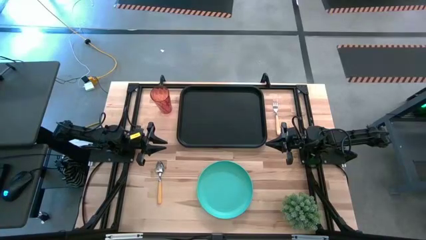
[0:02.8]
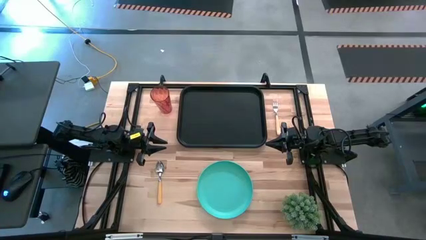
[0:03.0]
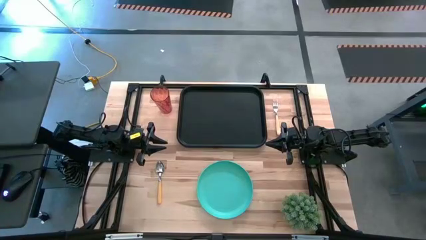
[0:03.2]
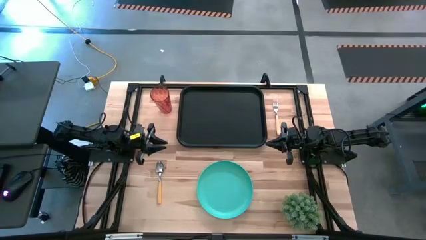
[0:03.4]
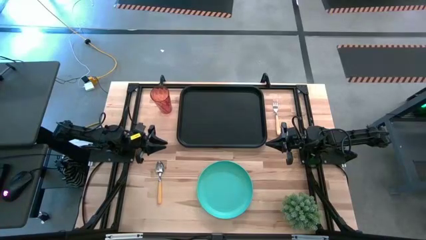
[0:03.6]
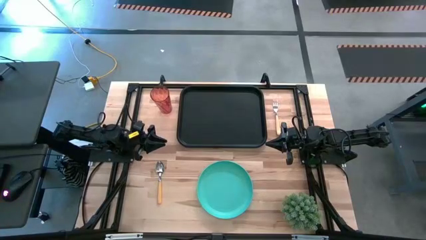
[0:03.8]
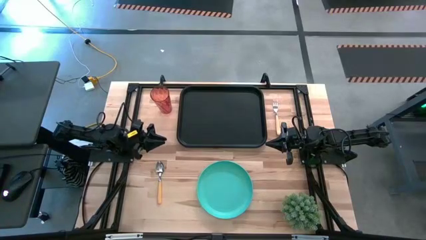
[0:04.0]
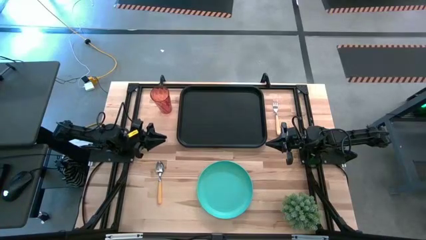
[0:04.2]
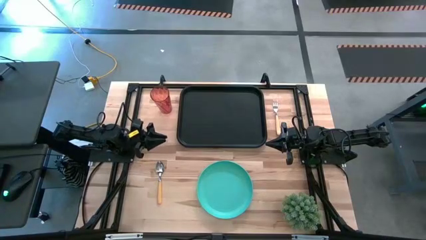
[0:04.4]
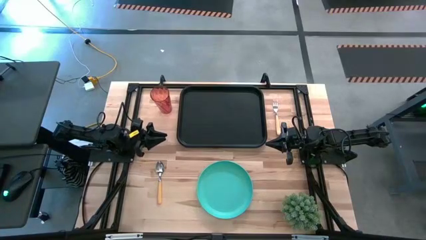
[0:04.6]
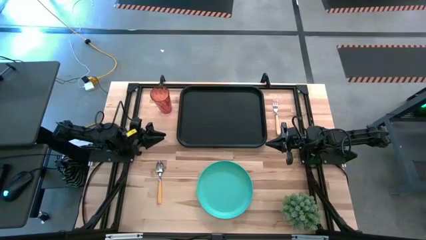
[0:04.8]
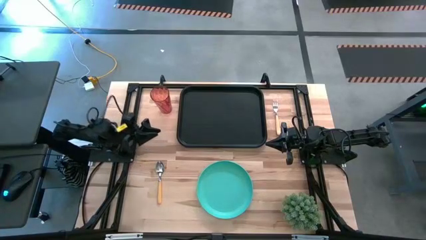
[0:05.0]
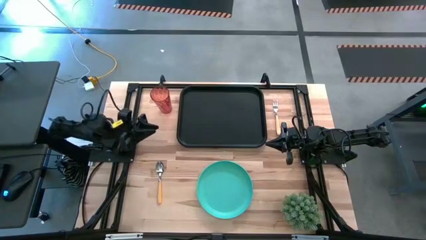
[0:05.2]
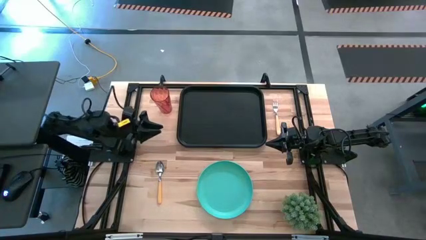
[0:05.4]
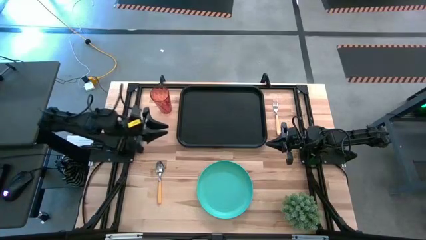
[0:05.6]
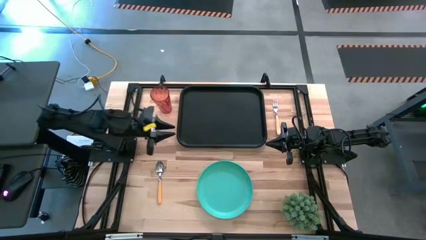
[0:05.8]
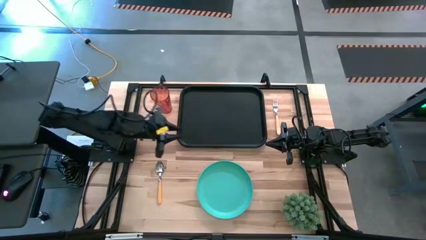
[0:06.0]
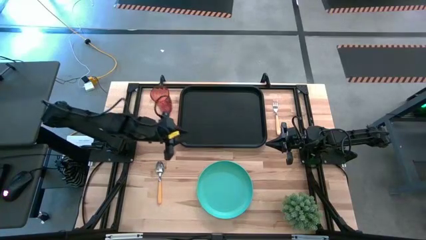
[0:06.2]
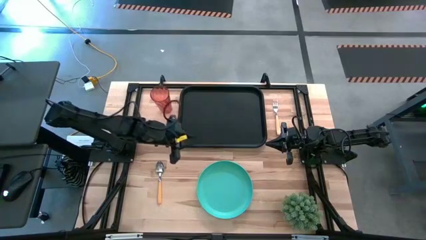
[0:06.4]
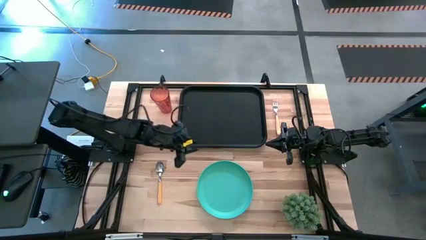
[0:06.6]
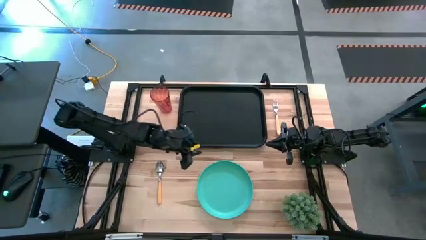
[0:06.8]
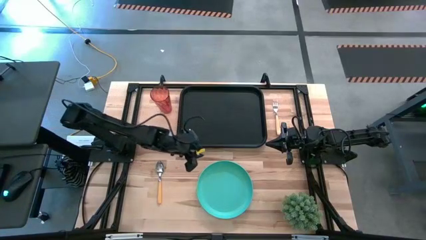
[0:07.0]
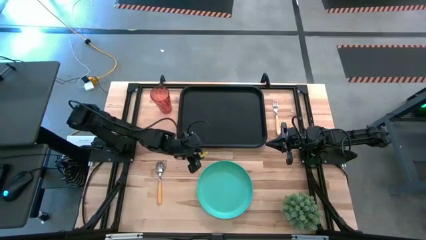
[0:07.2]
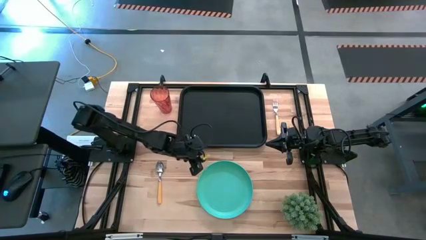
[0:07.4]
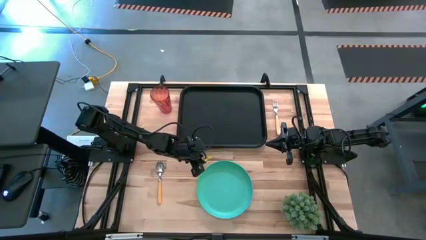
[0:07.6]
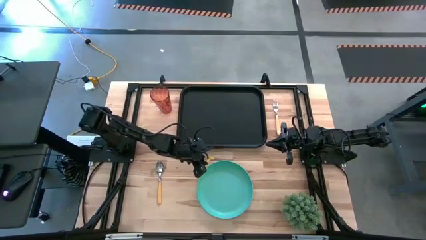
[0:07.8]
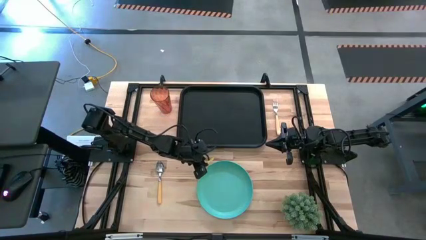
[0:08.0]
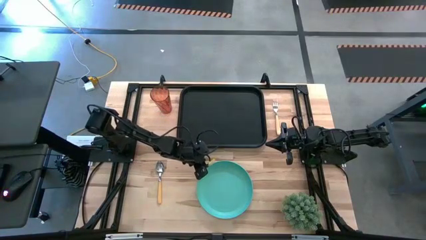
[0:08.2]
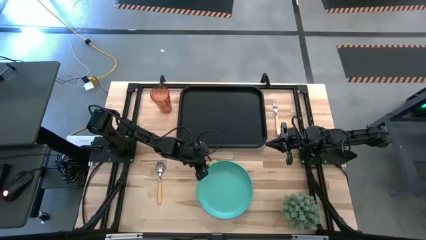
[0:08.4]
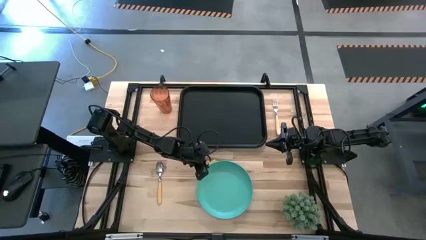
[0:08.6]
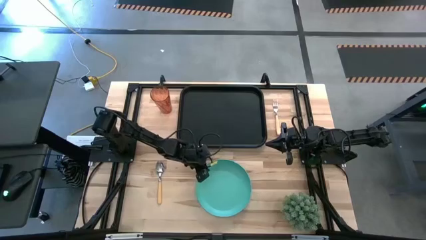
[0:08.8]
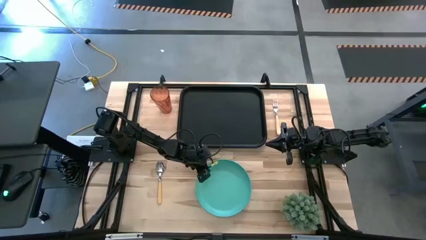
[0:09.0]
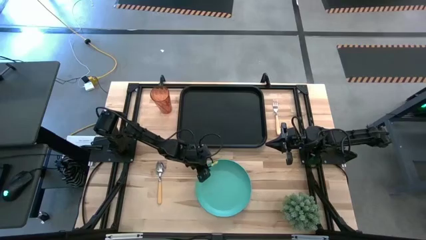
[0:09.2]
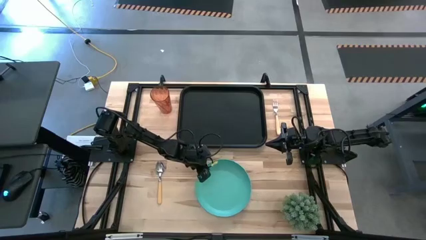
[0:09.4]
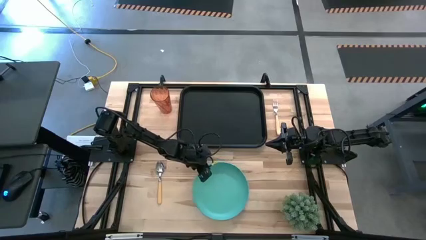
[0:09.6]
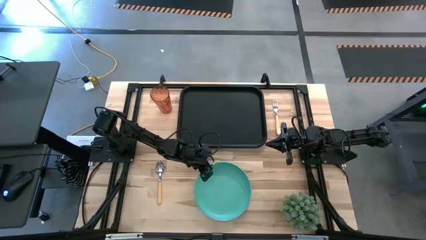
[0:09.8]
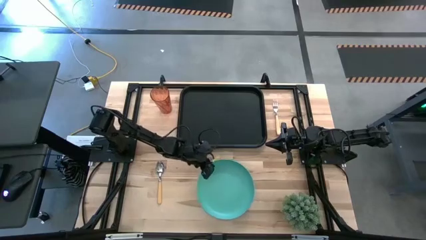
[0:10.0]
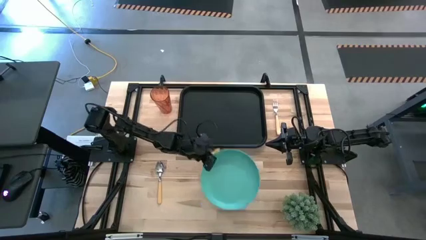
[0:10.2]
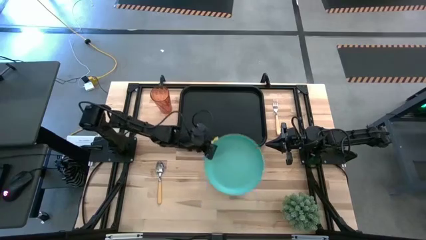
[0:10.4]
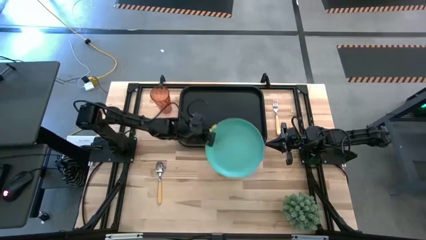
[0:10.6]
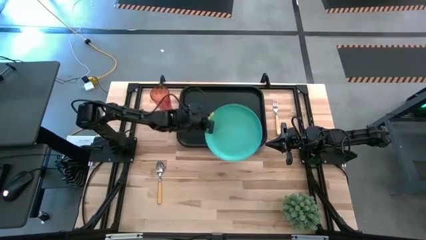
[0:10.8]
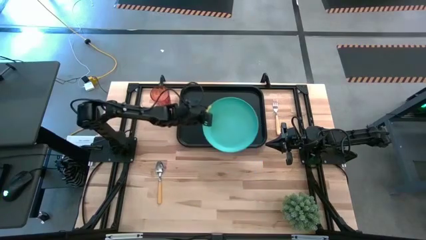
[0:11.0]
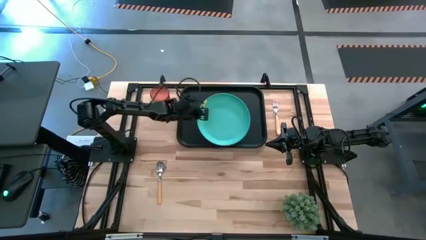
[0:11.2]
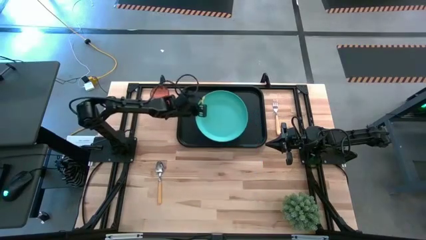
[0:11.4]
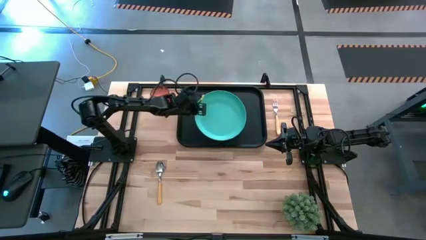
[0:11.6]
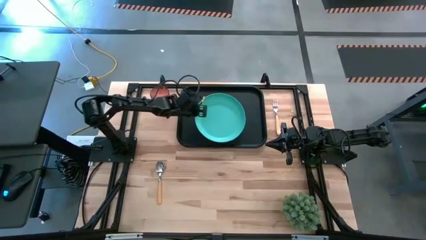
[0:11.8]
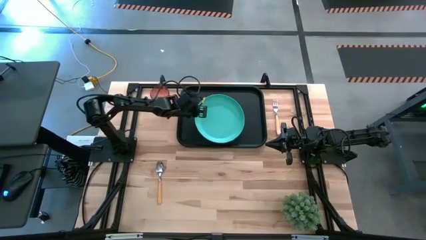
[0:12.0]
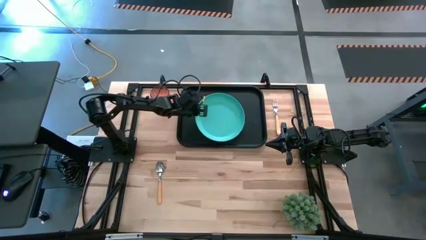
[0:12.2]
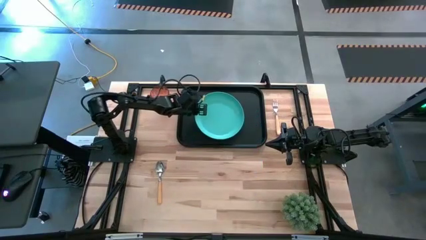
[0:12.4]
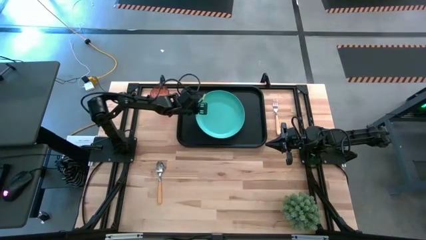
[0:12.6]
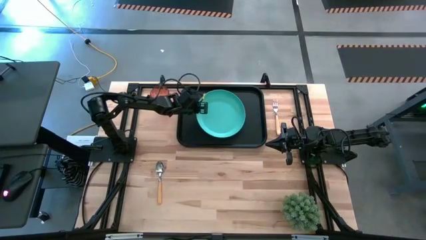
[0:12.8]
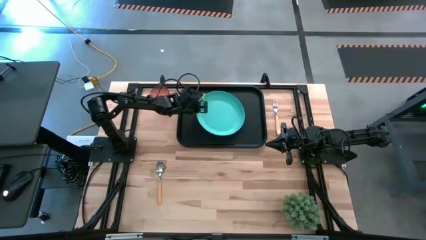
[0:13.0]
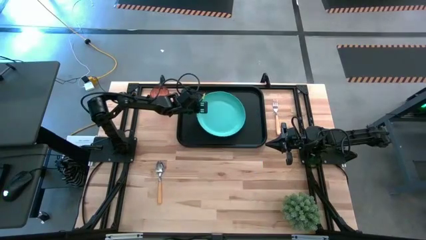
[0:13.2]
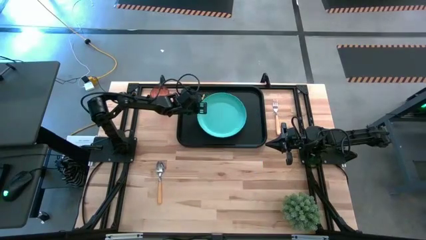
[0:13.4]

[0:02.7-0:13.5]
Task: Pick and place plate/cup/fork/spoon on tray
Put the blue plate on the black serving tray

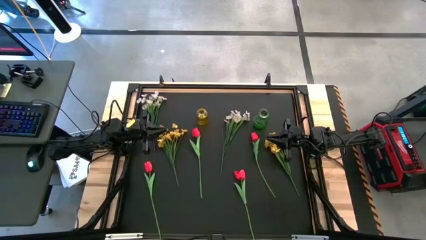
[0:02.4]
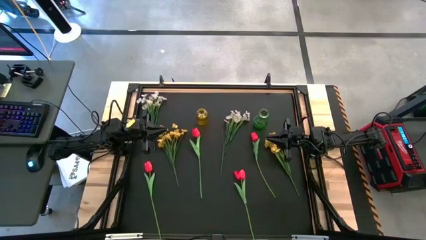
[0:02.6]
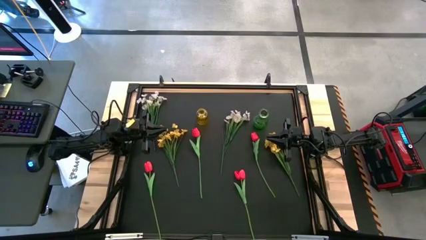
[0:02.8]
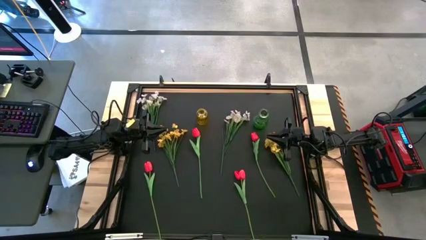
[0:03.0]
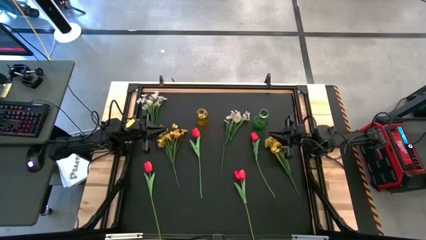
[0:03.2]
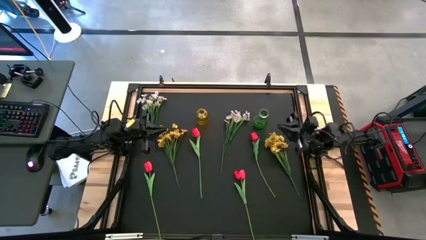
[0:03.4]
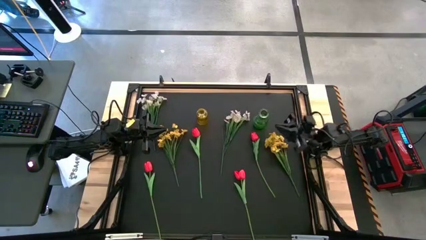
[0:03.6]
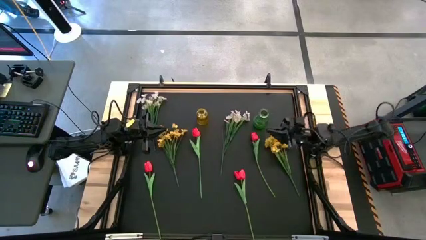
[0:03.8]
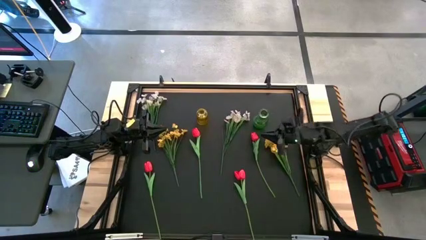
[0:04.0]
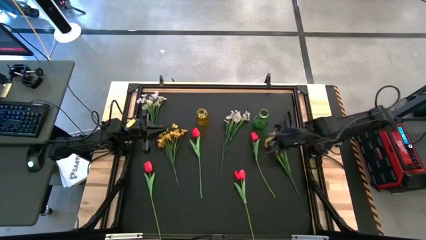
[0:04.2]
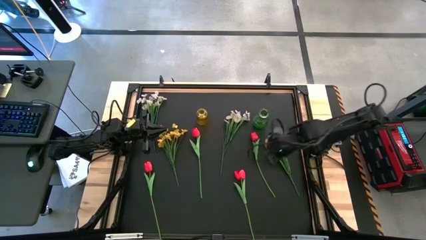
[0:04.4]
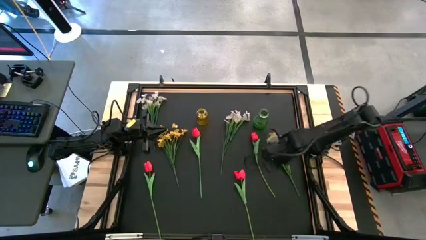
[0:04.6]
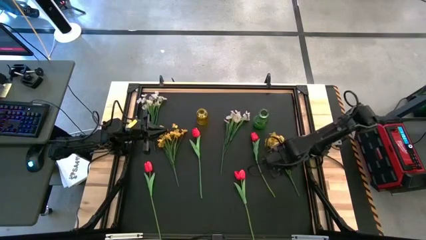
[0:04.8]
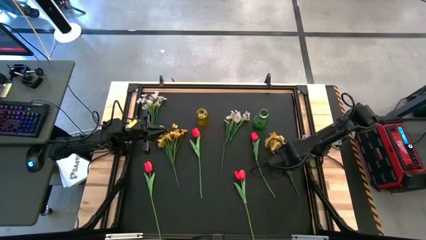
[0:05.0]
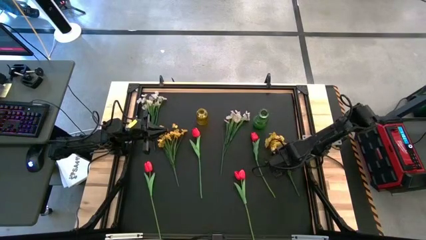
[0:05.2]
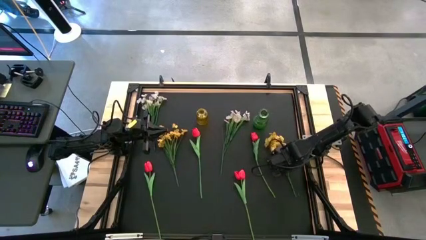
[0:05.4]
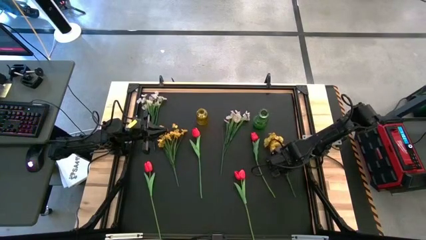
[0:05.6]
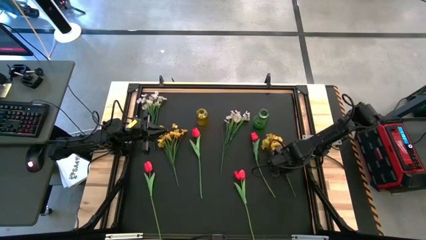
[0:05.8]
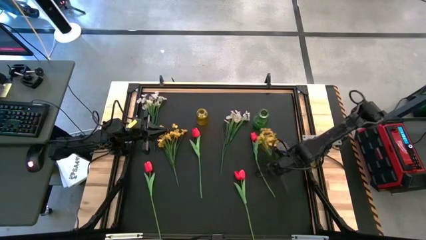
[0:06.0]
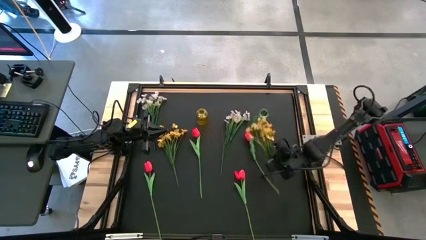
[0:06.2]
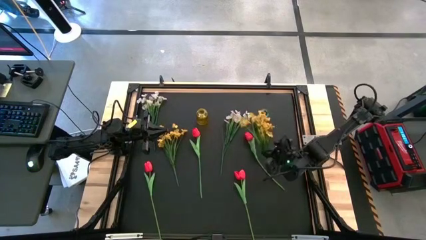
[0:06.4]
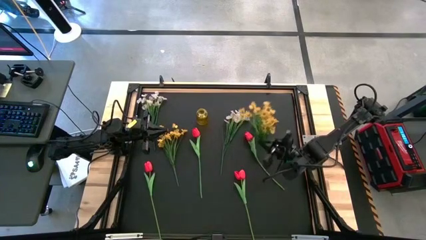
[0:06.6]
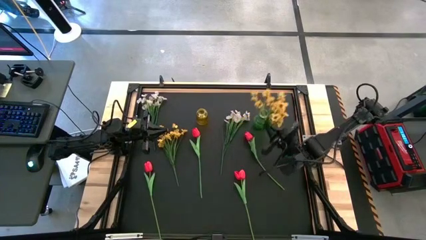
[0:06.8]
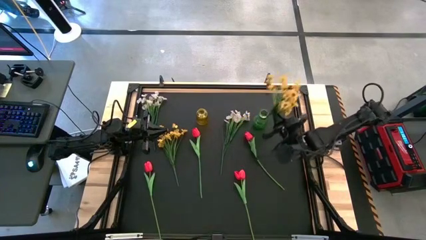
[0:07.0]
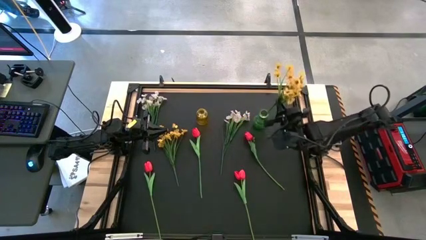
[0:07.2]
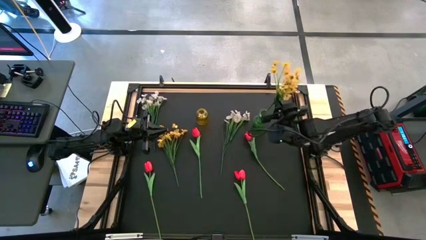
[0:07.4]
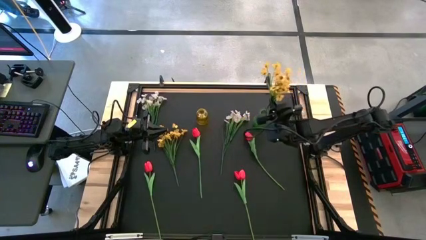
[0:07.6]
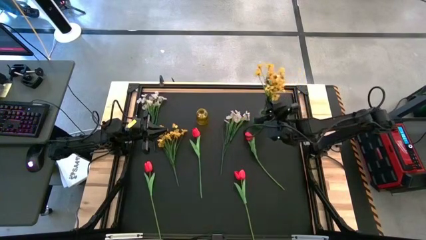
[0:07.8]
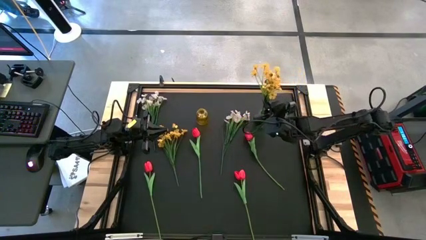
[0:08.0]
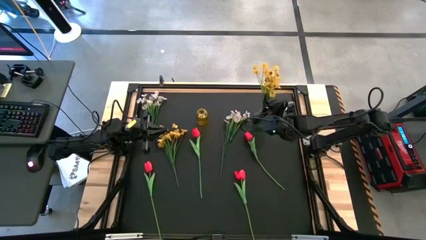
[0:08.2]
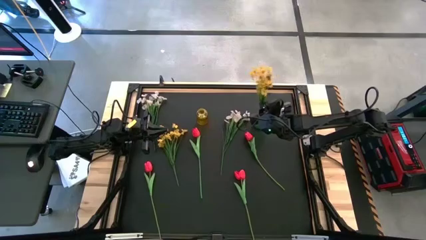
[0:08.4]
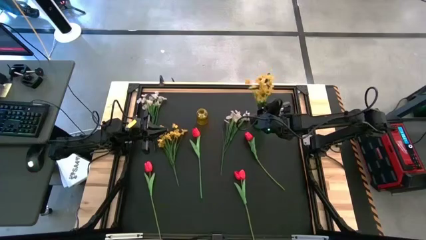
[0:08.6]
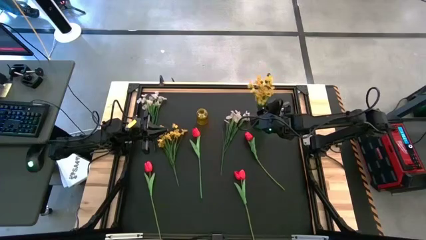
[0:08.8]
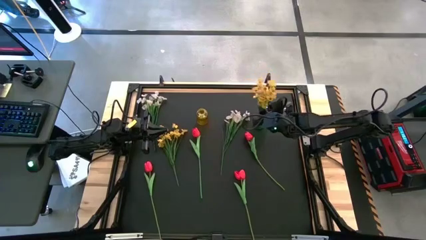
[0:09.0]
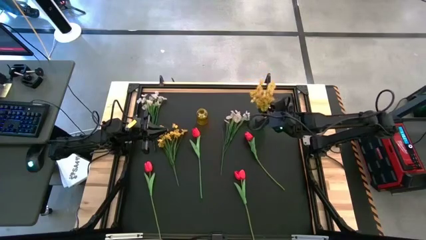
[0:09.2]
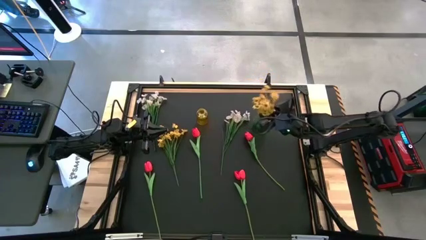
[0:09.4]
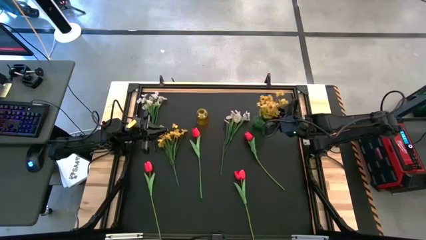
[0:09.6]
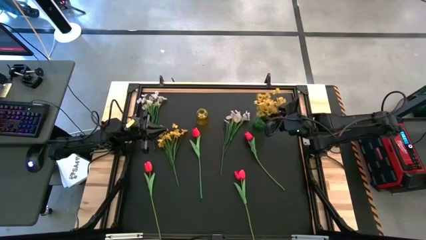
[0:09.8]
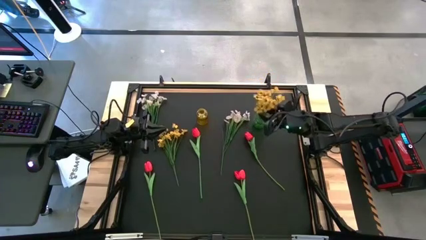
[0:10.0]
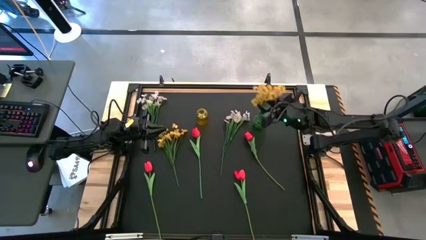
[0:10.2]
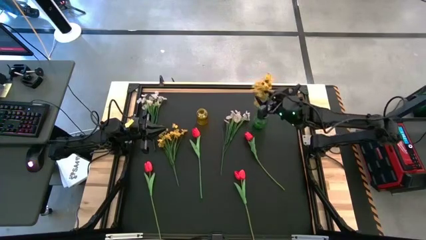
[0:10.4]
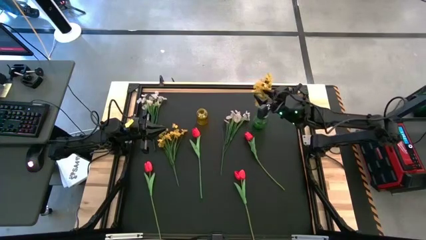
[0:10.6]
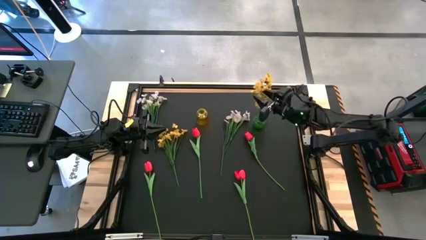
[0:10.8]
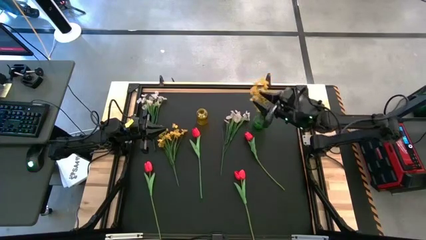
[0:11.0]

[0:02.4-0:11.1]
Task: Sort flowers into vase by color
Put the yellow flowers into the green vase
